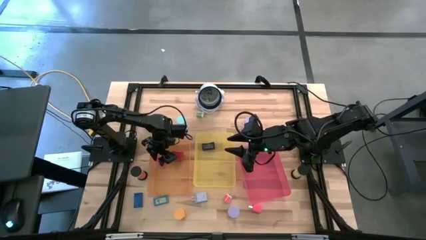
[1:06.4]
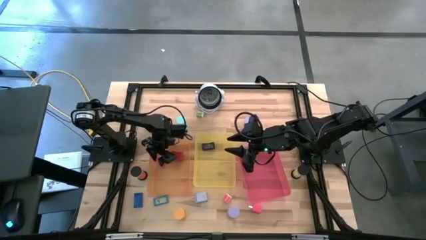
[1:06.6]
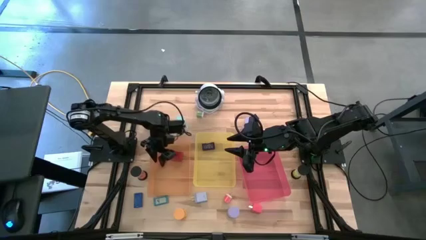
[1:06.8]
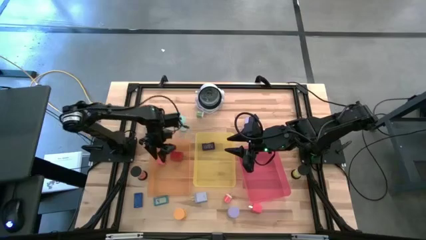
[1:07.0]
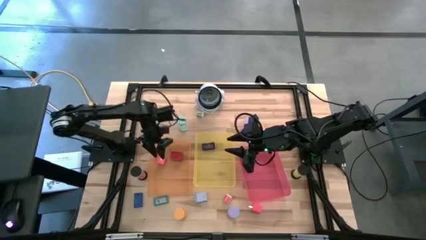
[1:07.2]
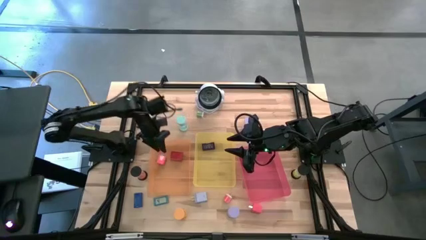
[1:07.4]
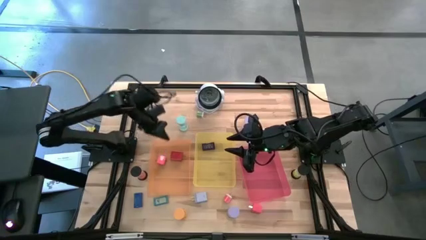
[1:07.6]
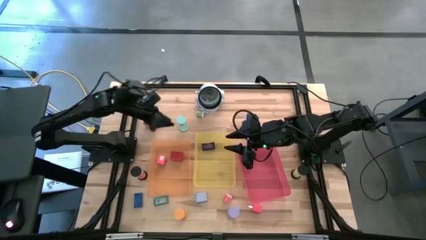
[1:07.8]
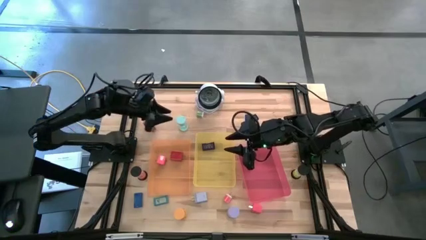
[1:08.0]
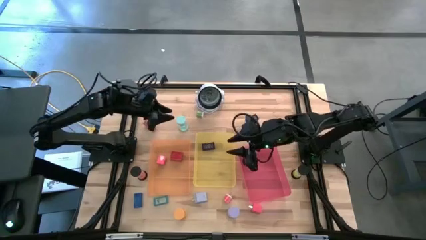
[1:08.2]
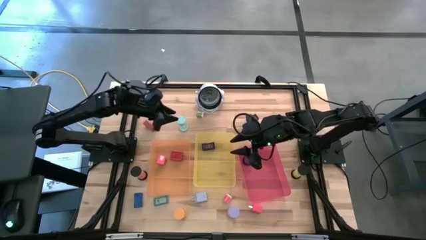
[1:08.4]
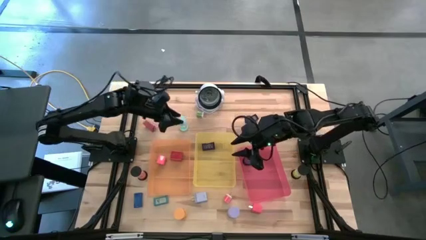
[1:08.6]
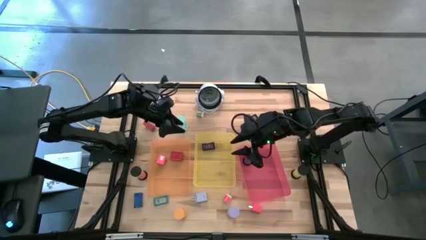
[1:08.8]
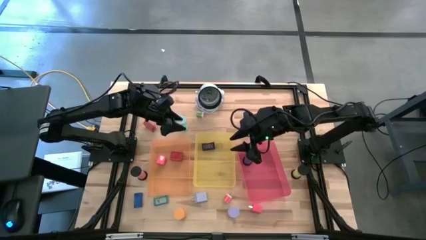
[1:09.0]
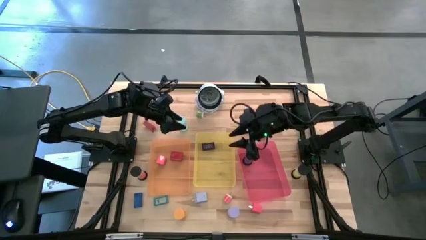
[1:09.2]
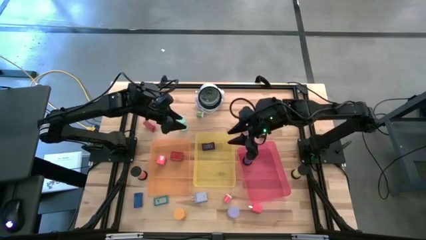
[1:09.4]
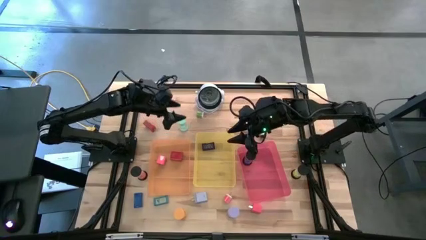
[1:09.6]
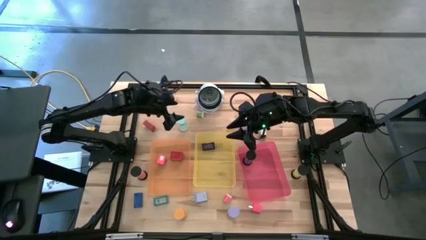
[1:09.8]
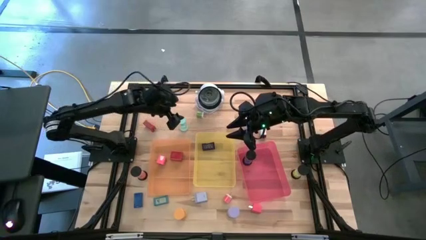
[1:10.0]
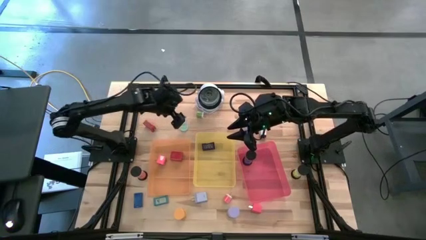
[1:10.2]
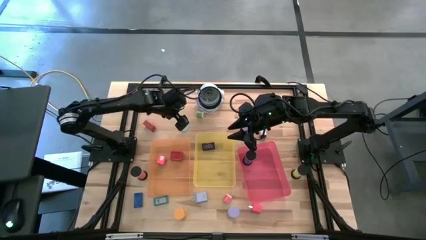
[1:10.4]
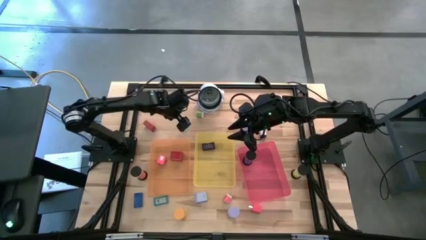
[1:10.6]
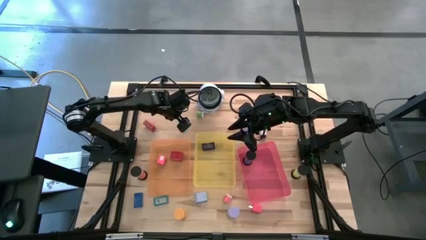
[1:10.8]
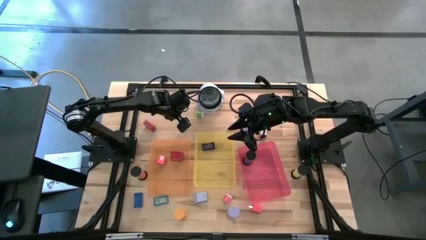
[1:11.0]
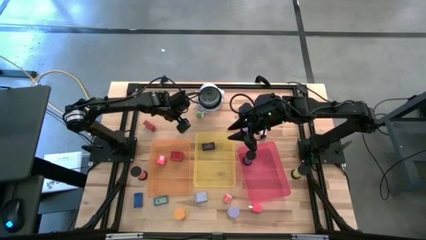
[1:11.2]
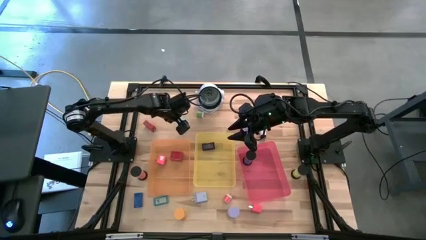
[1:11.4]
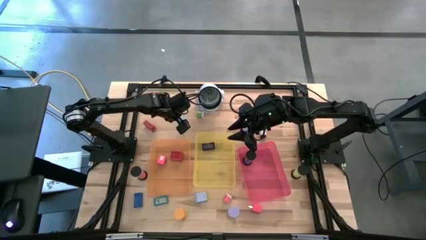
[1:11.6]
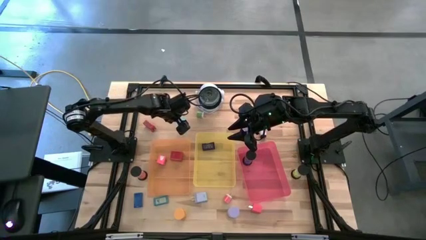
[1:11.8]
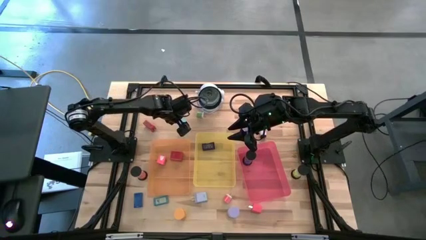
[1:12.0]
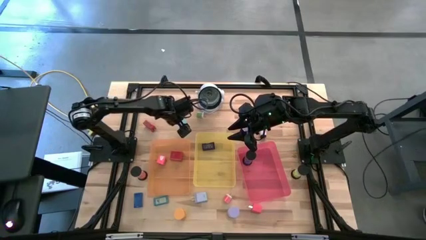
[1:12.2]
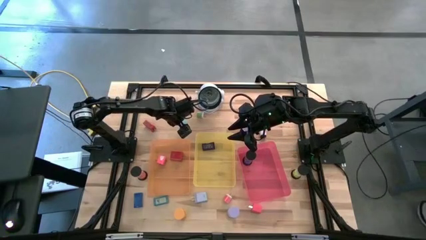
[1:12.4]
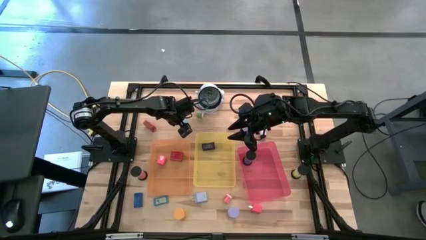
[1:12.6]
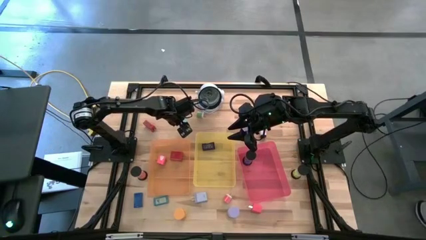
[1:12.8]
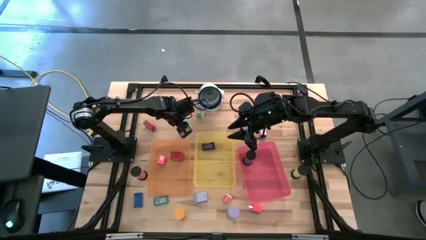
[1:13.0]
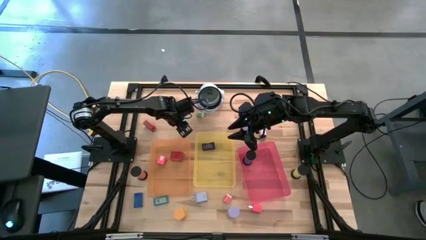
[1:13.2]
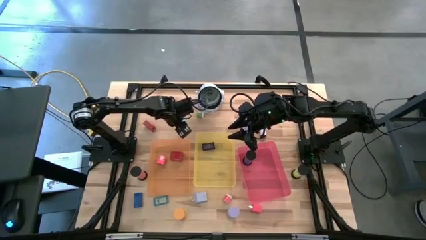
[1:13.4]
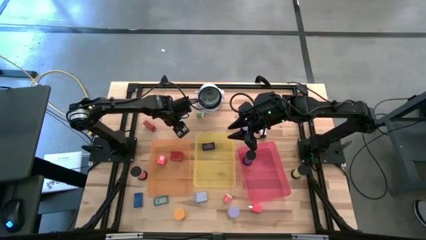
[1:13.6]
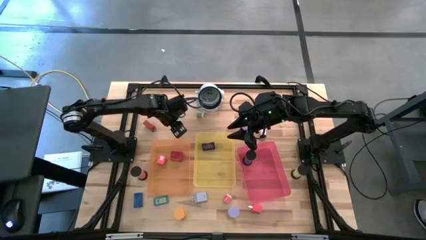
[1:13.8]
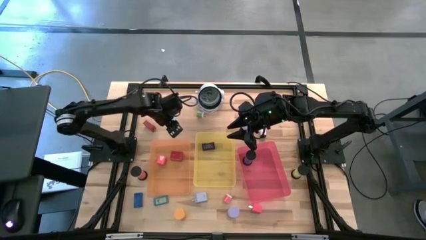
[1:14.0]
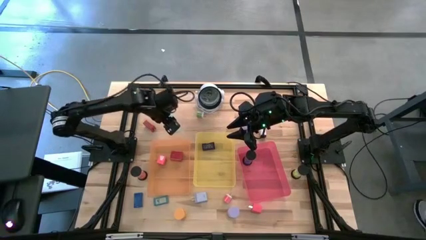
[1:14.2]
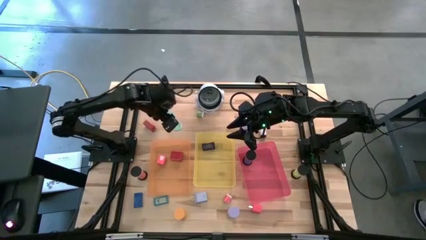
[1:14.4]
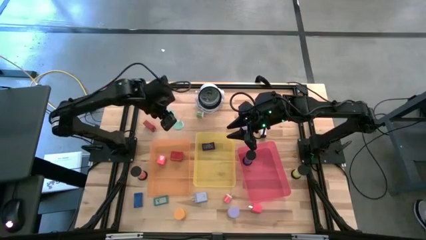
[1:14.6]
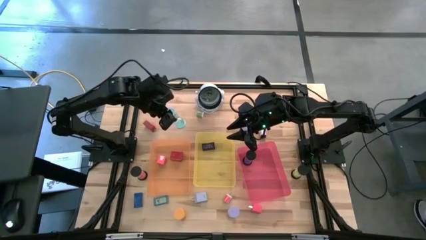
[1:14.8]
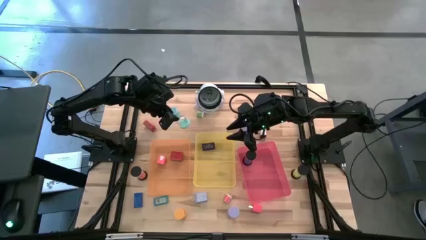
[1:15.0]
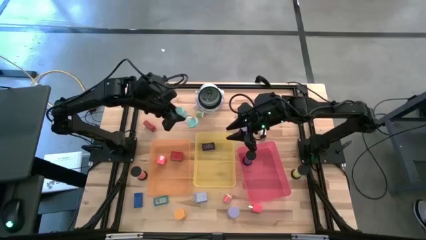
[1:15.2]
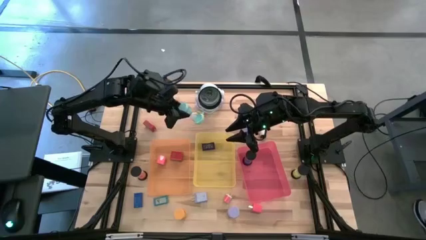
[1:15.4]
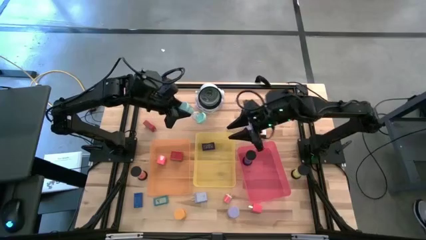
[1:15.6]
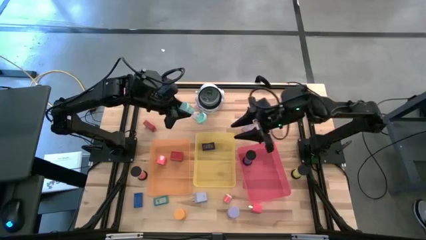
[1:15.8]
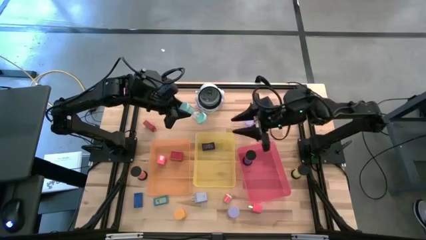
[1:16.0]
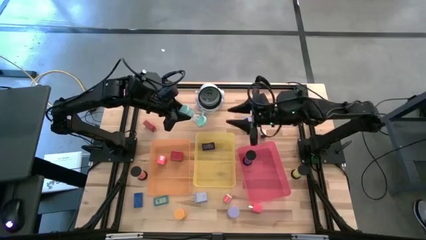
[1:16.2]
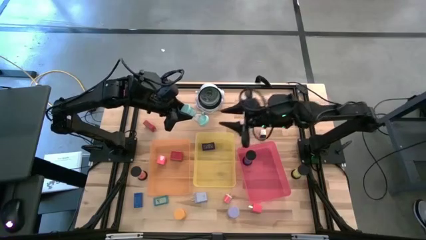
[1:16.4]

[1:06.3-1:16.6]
Task: Pick & Place Office items
Put the blue hourglass timer into the red bin
